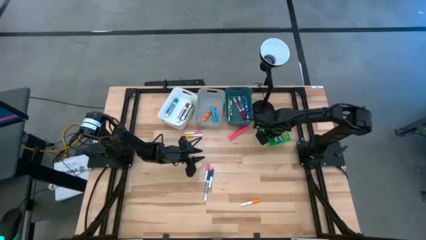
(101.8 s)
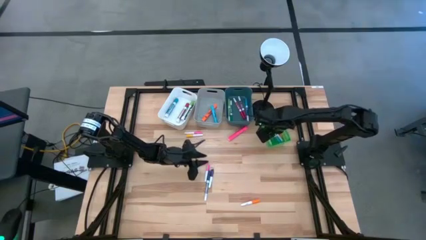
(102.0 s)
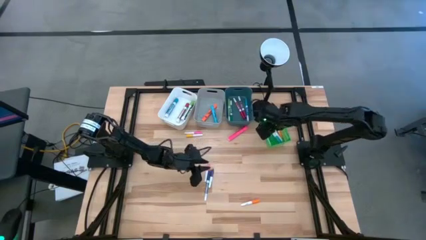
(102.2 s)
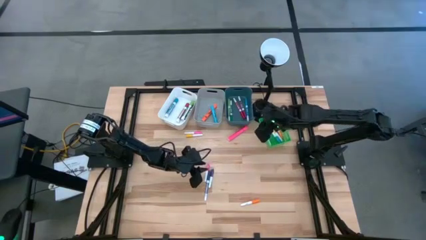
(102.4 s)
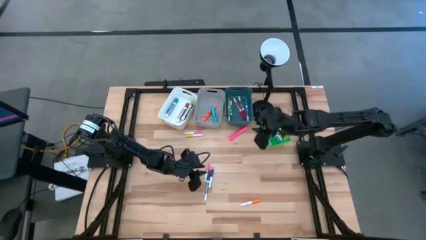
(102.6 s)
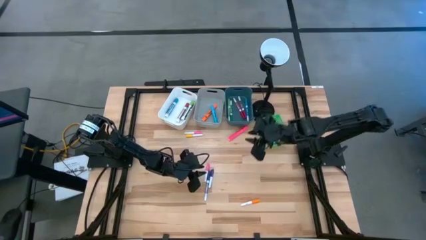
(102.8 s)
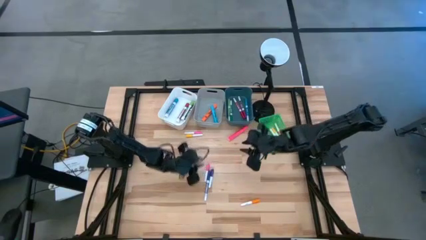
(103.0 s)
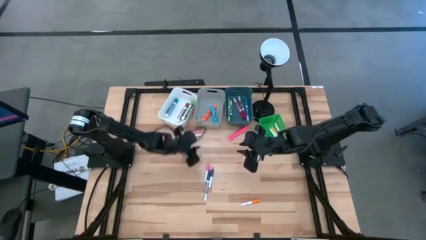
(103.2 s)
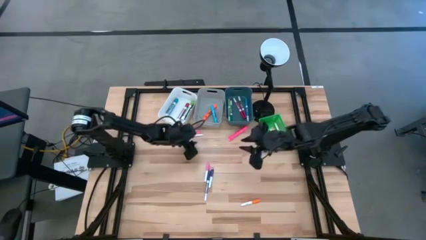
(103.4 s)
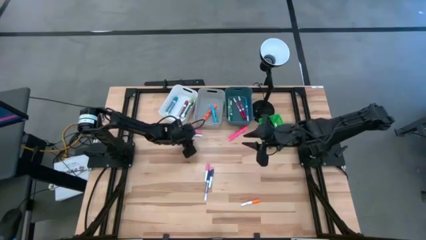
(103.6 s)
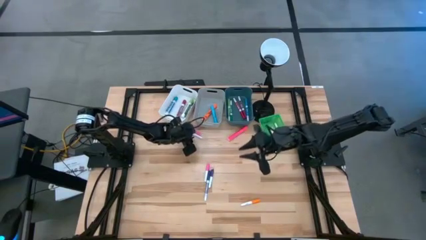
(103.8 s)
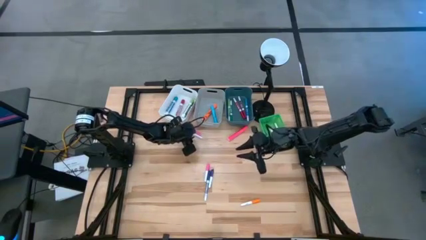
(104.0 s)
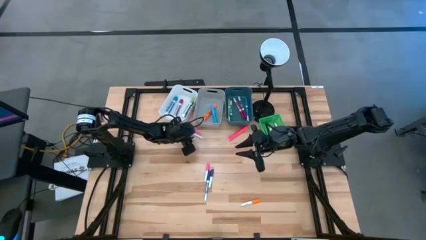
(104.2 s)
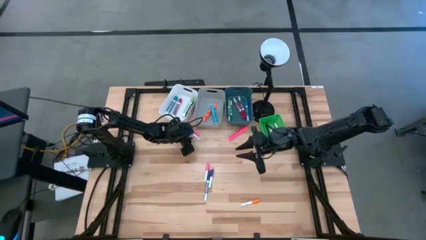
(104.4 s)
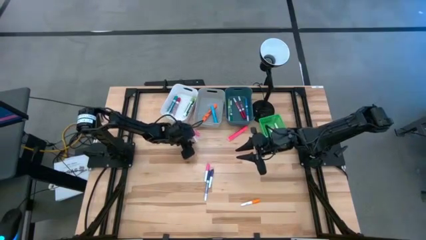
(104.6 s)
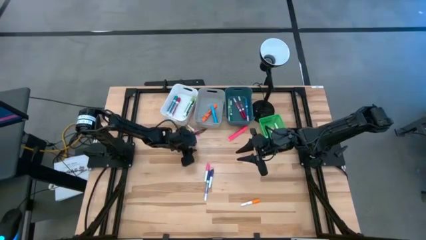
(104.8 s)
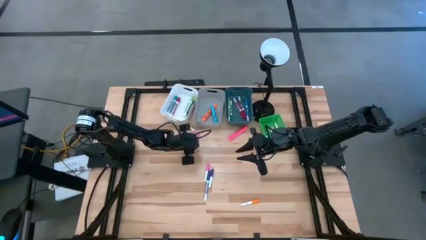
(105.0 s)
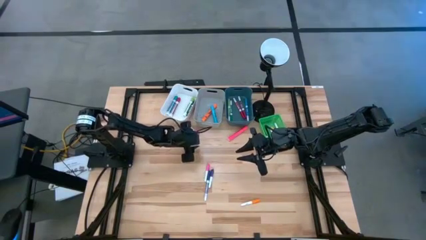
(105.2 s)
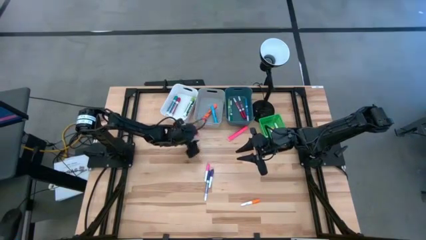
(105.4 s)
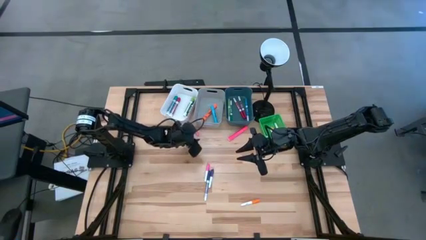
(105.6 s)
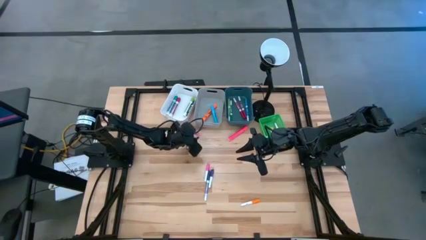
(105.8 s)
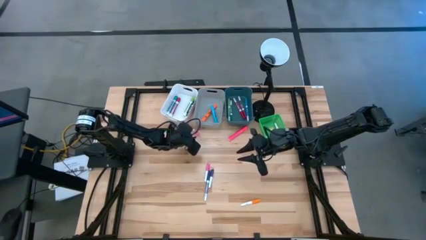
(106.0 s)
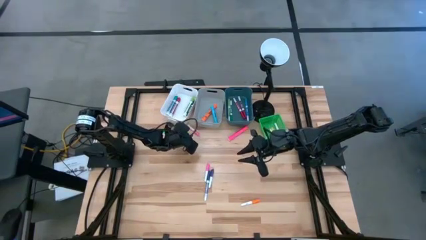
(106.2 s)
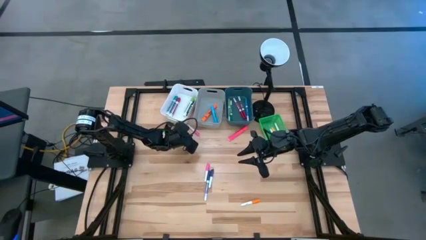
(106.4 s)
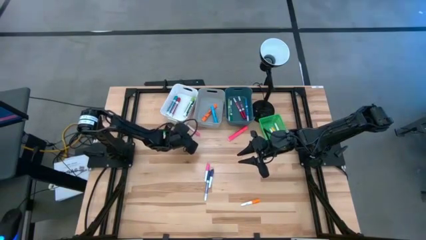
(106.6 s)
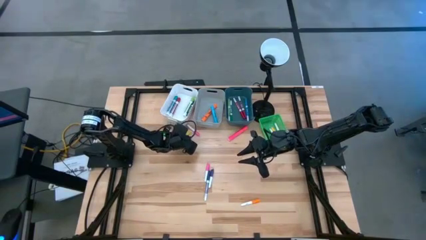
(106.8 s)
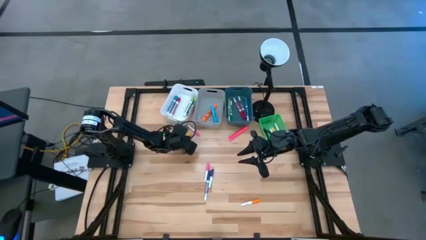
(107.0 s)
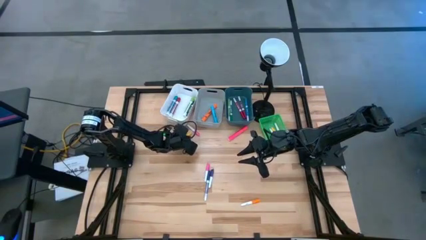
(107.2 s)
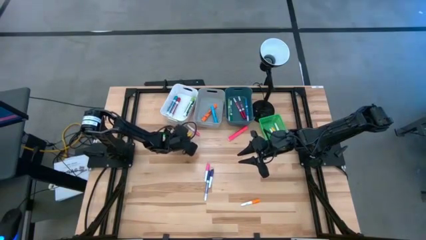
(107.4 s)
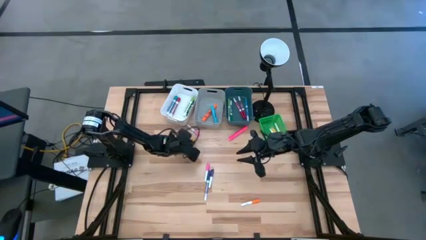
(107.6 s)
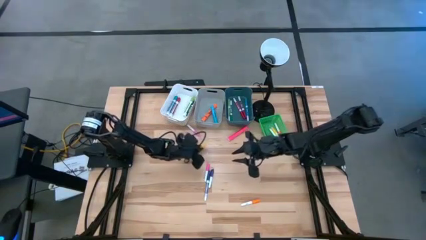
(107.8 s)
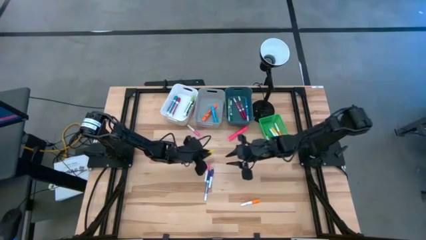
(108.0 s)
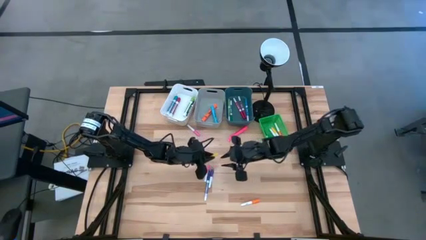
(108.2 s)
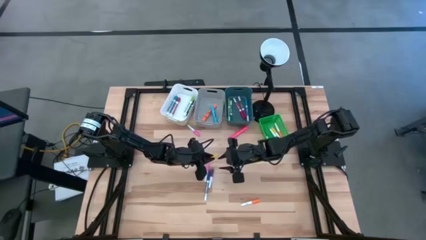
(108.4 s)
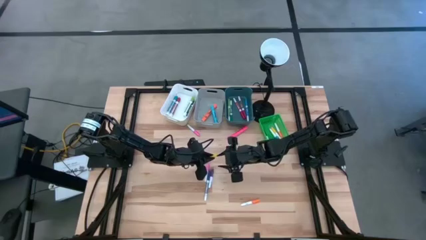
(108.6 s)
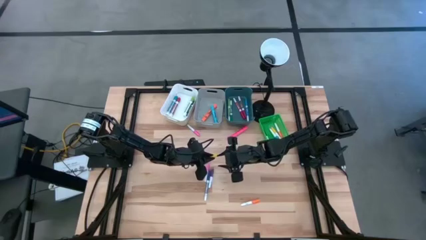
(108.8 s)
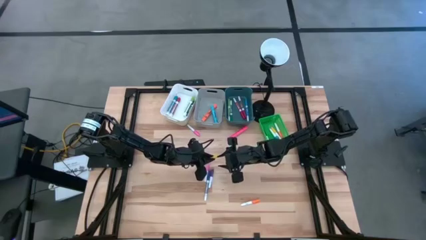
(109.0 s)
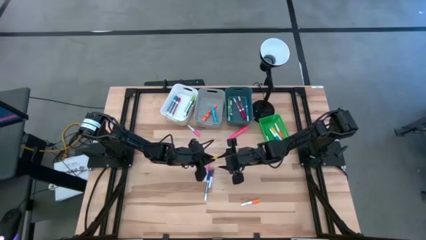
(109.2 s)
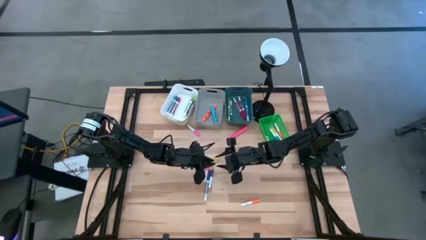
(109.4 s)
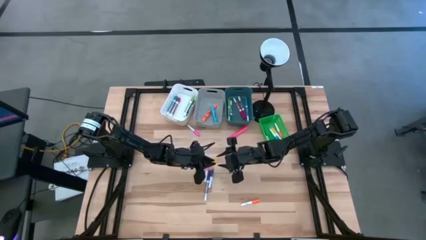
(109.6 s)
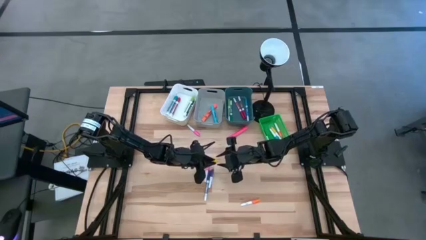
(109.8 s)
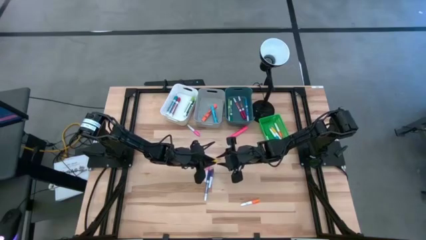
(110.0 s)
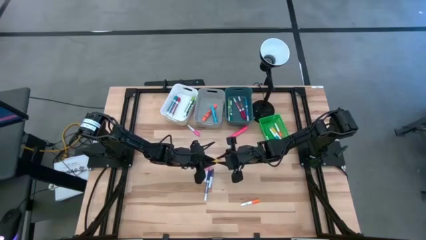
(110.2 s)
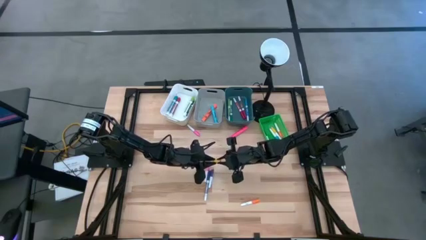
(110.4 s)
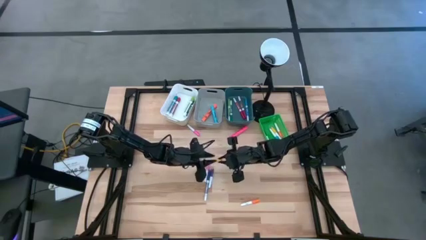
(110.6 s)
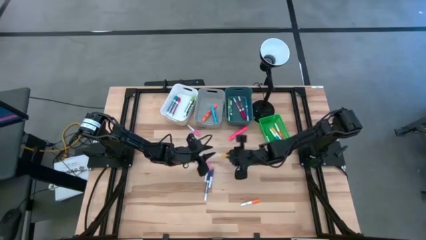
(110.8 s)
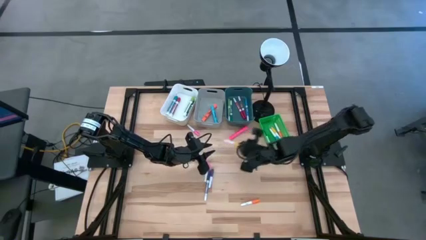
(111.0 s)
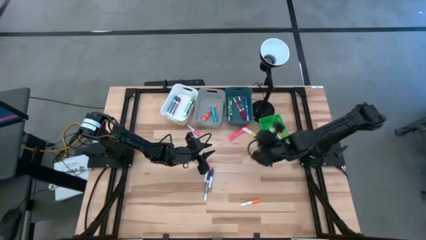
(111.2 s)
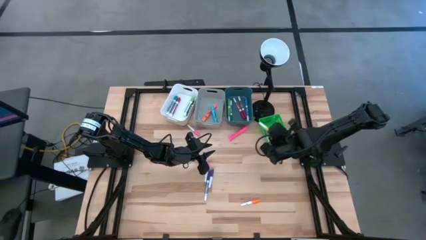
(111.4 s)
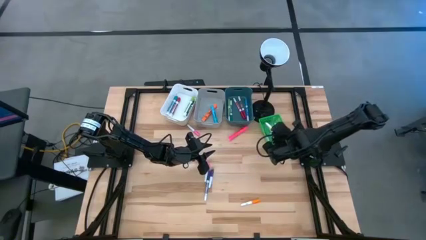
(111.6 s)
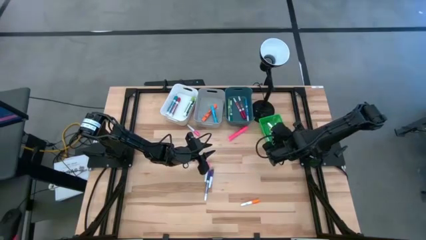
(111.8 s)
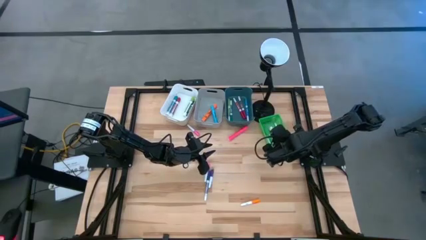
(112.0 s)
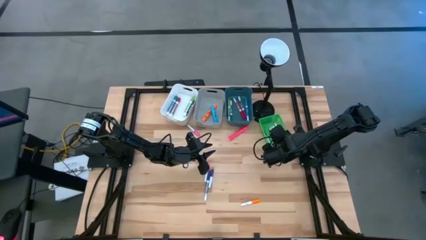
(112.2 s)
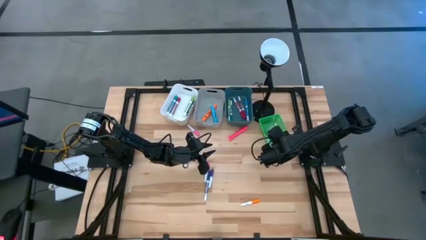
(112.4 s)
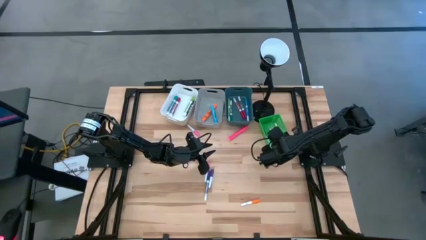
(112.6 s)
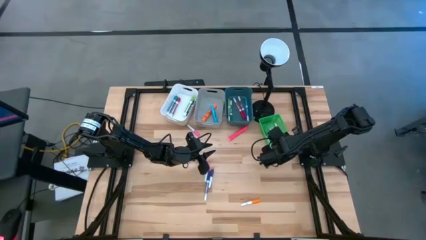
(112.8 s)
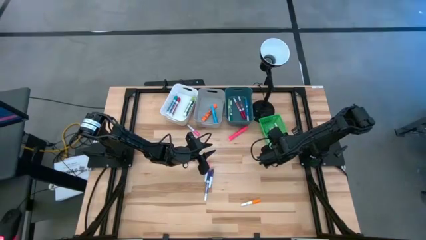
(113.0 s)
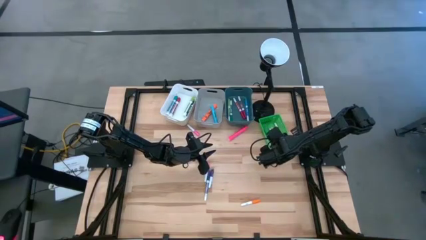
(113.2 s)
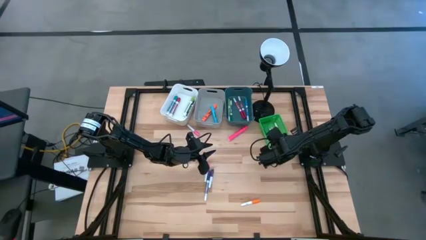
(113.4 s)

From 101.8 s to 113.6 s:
Task: Pick & Place Markers
Put the yellow highlighter pen into the green bin

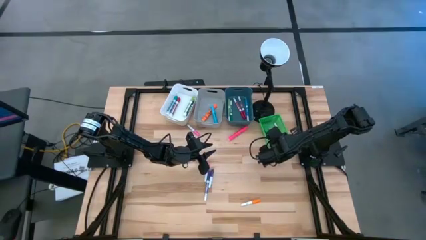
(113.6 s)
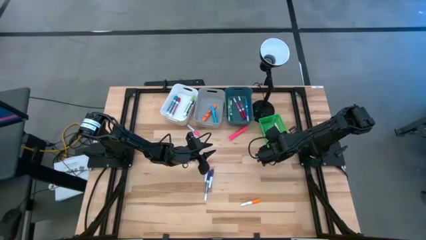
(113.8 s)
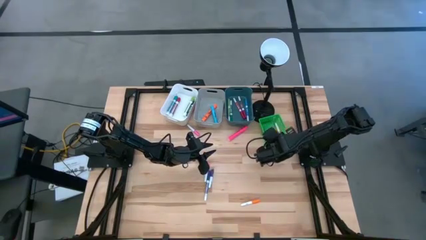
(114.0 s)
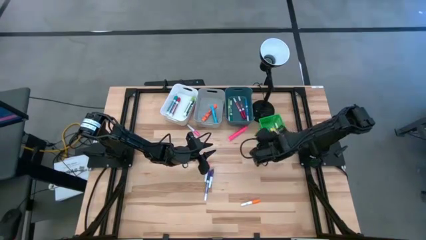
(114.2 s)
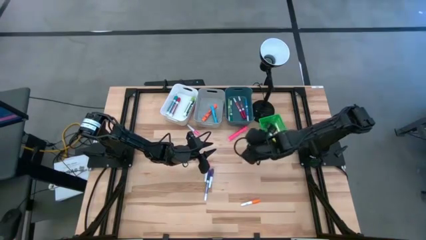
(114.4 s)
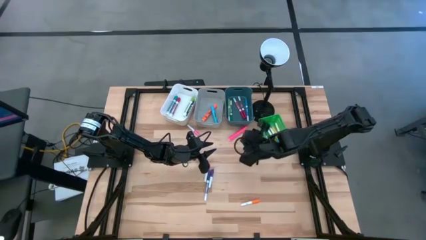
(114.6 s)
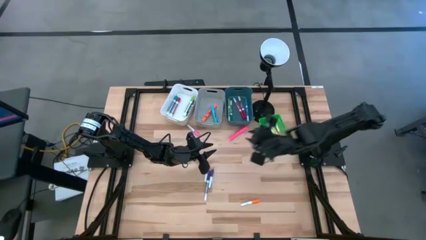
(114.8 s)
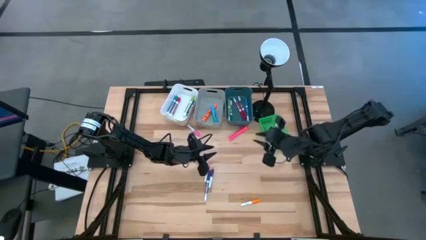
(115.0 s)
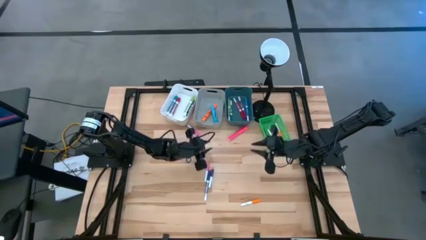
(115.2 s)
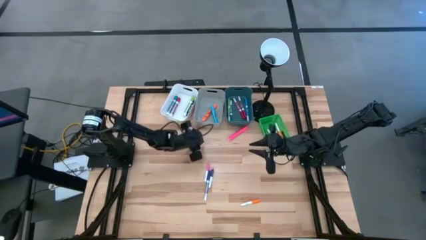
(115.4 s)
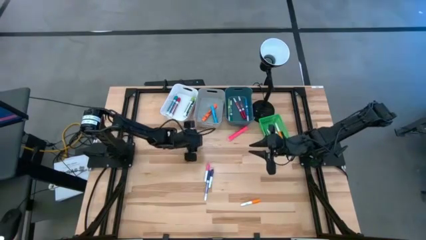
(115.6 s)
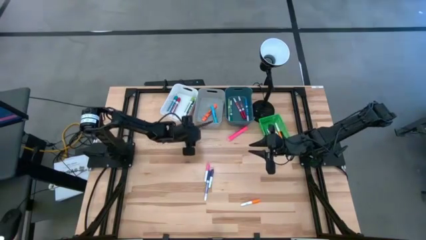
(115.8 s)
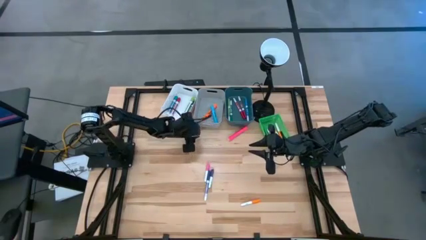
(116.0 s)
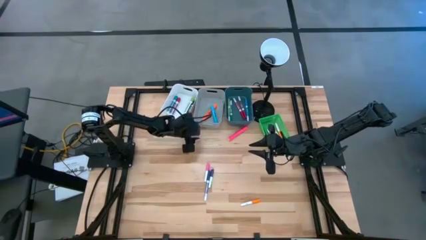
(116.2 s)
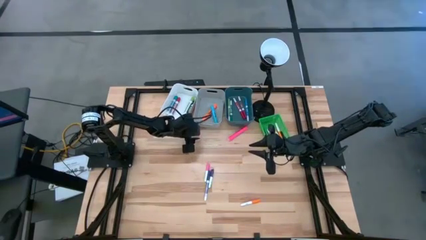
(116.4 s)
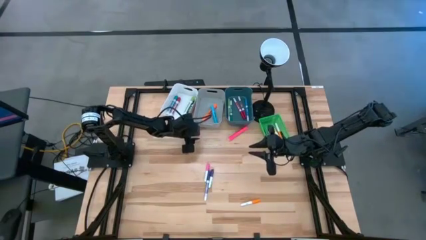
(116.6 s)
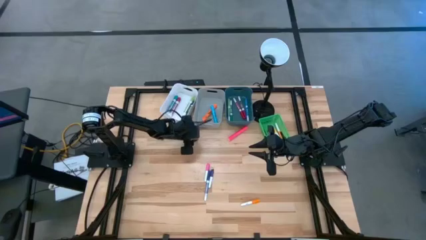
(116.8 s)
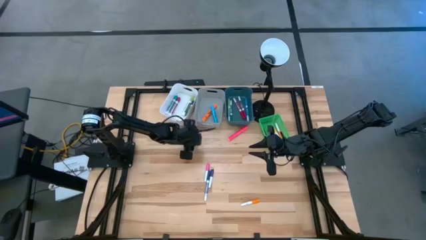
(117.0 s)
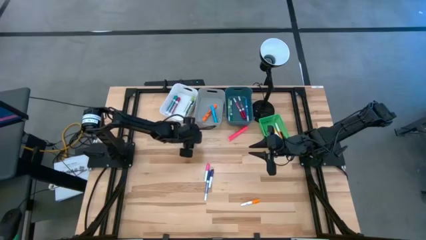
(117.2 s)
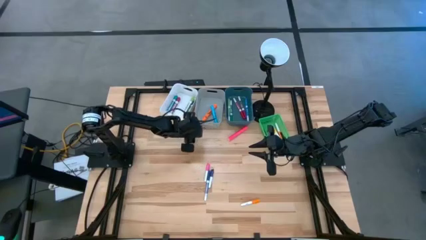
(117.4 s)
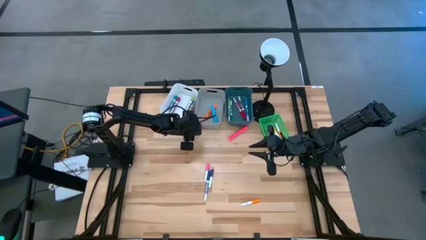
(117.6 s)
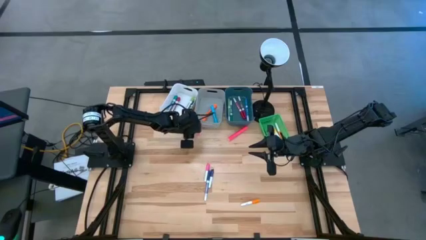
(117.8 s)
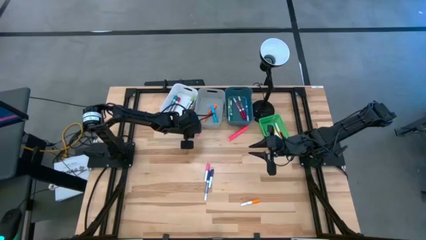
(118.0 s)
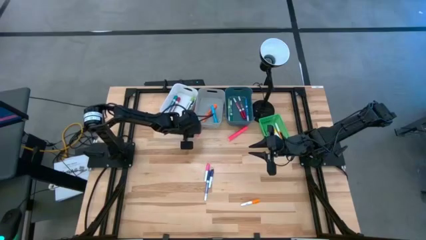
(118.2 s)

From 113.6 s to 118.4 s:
Put the pink highlighter pen into the green bin
